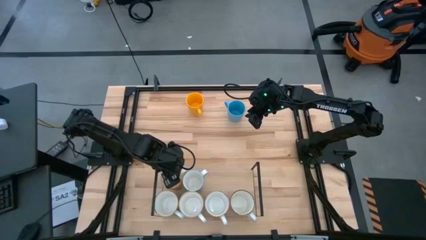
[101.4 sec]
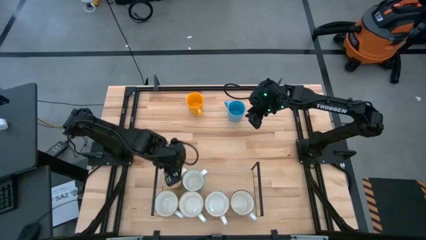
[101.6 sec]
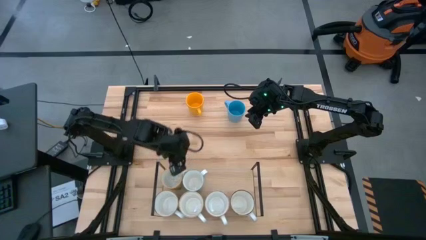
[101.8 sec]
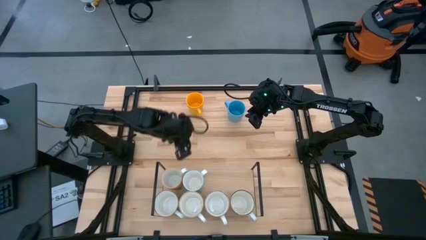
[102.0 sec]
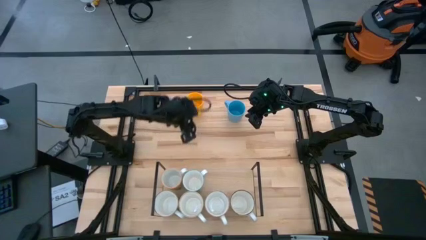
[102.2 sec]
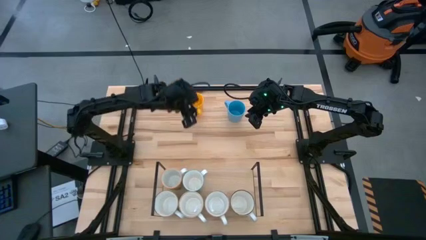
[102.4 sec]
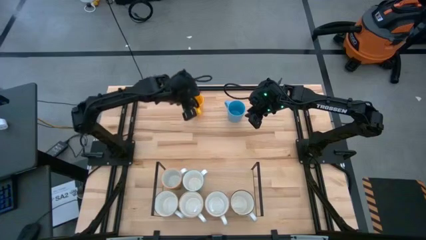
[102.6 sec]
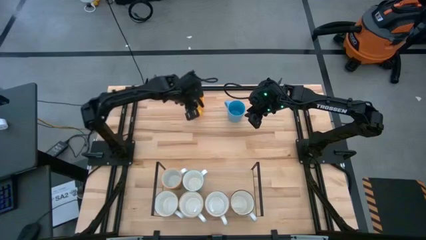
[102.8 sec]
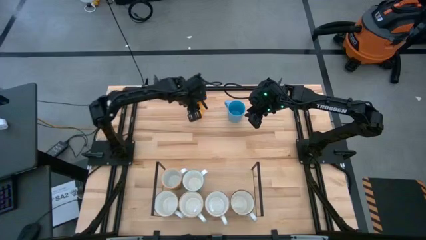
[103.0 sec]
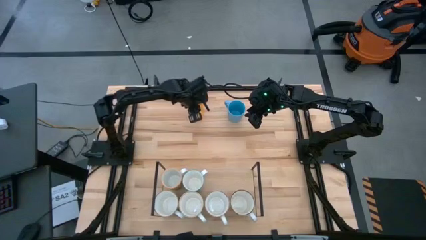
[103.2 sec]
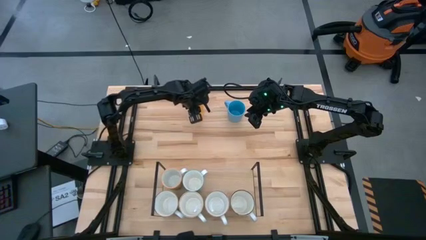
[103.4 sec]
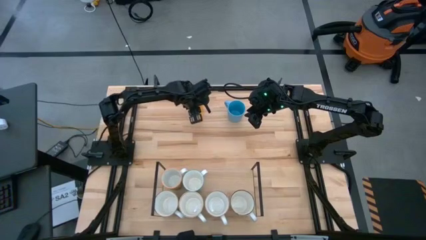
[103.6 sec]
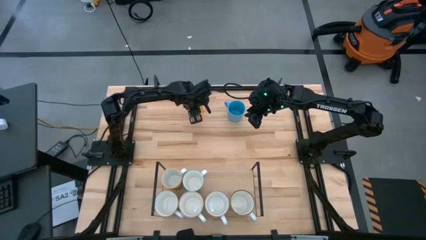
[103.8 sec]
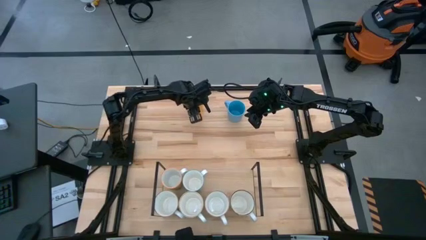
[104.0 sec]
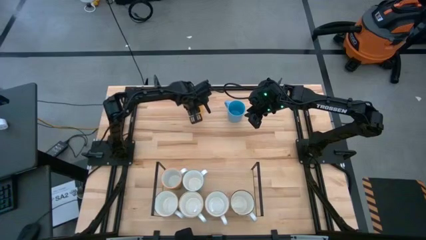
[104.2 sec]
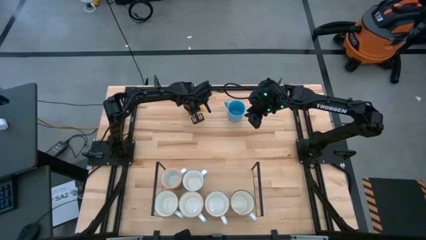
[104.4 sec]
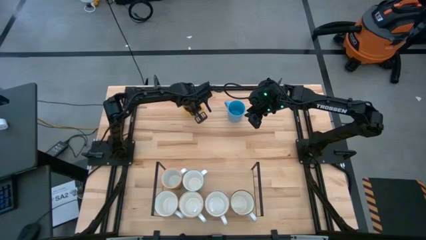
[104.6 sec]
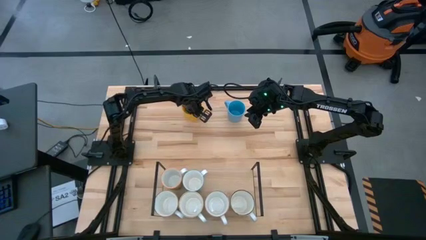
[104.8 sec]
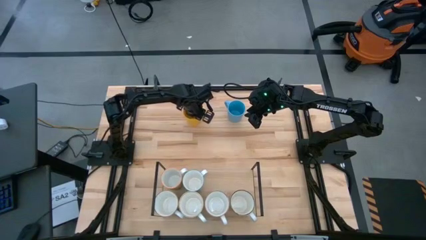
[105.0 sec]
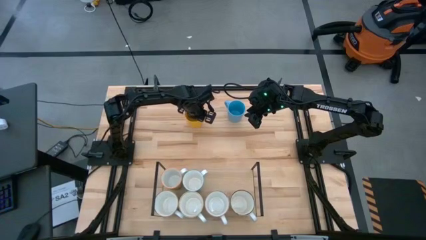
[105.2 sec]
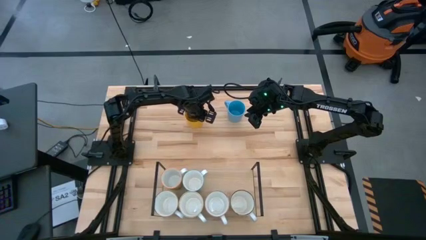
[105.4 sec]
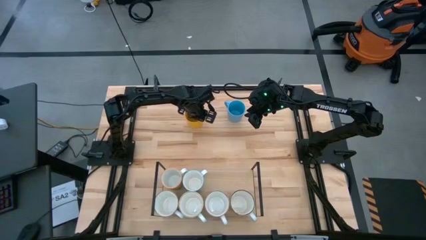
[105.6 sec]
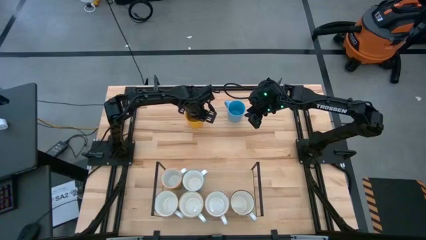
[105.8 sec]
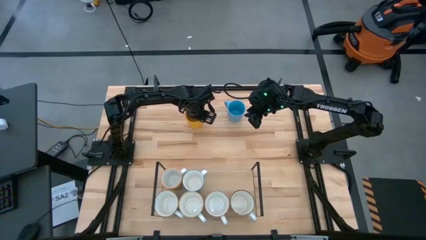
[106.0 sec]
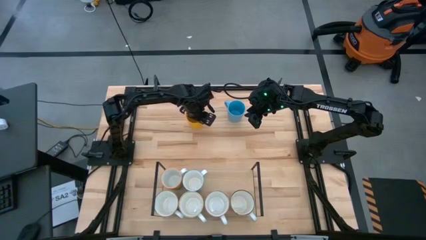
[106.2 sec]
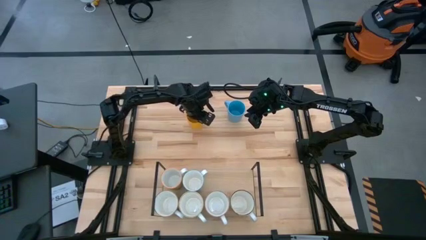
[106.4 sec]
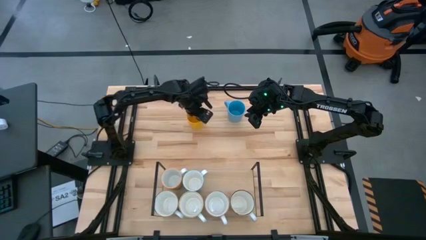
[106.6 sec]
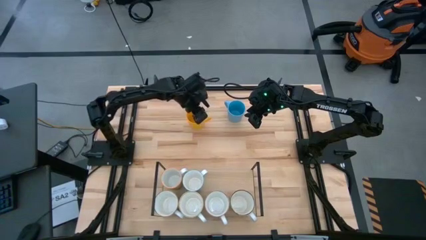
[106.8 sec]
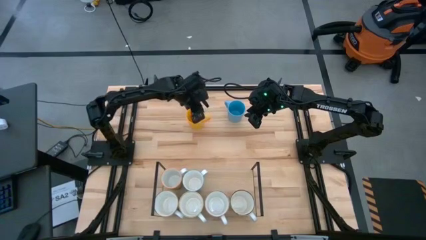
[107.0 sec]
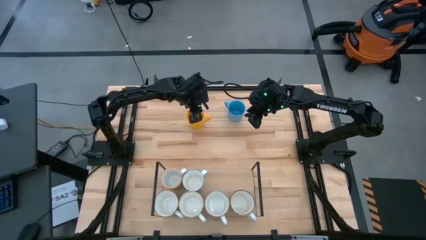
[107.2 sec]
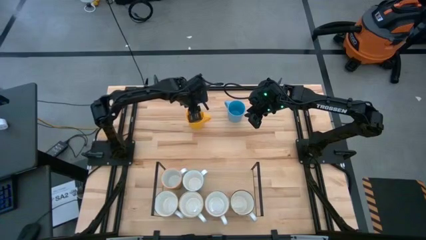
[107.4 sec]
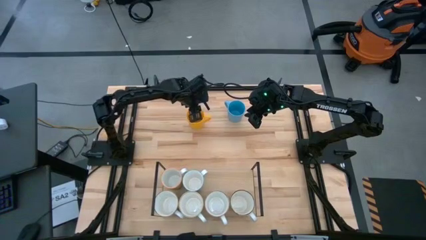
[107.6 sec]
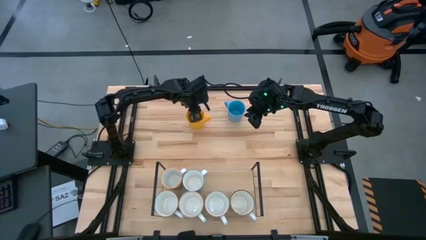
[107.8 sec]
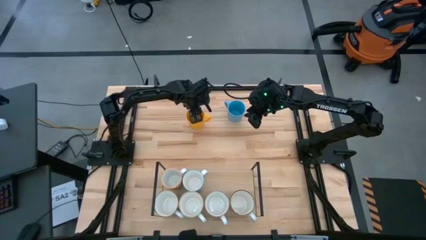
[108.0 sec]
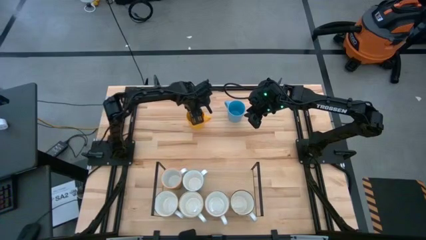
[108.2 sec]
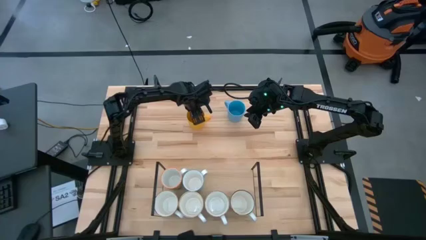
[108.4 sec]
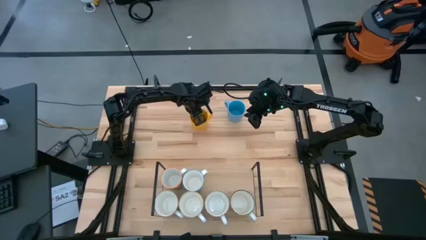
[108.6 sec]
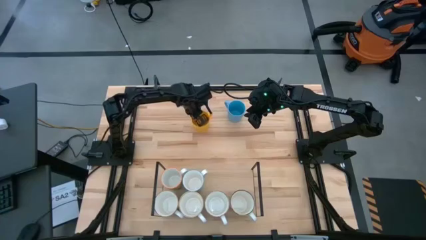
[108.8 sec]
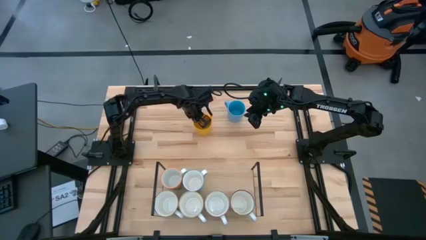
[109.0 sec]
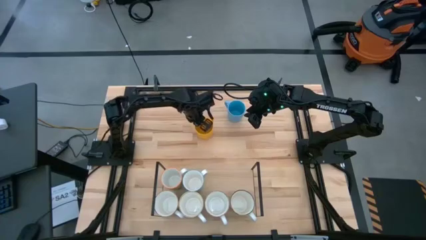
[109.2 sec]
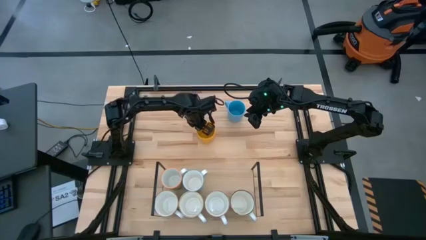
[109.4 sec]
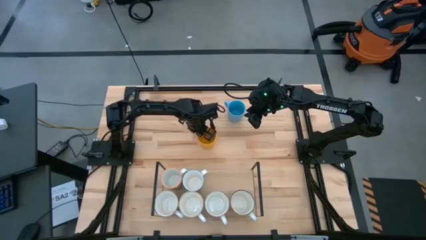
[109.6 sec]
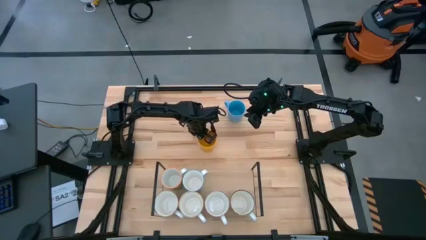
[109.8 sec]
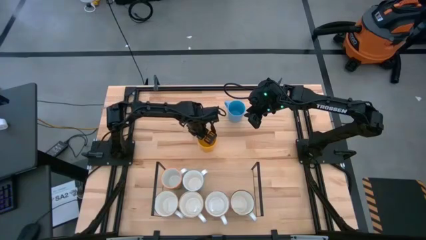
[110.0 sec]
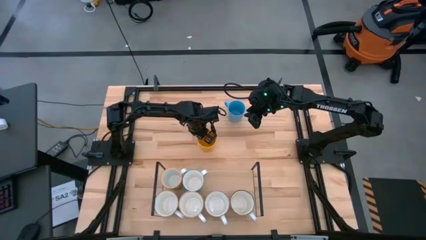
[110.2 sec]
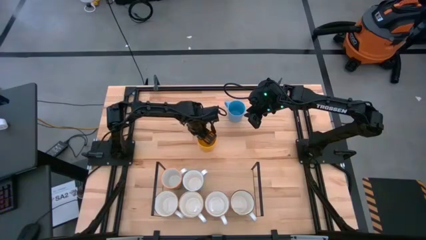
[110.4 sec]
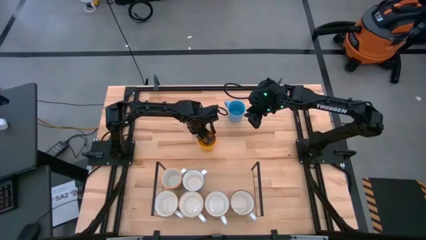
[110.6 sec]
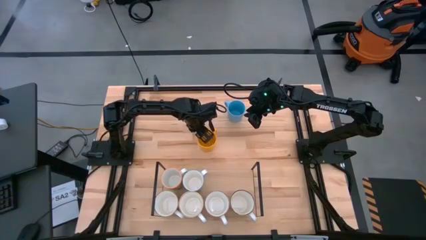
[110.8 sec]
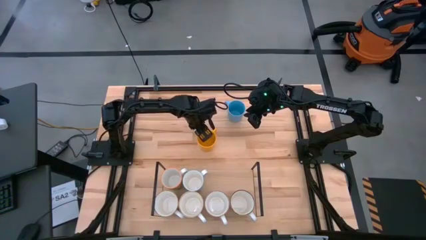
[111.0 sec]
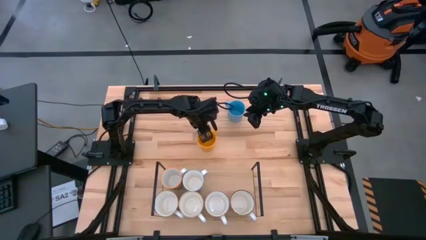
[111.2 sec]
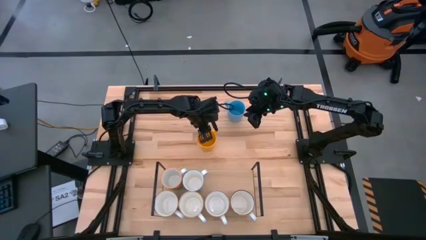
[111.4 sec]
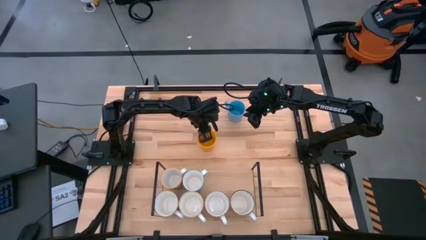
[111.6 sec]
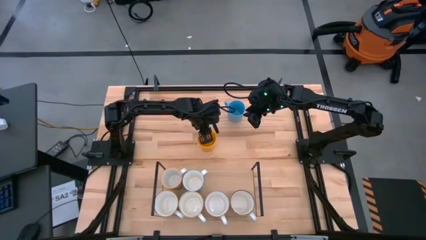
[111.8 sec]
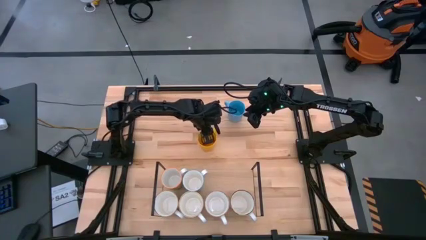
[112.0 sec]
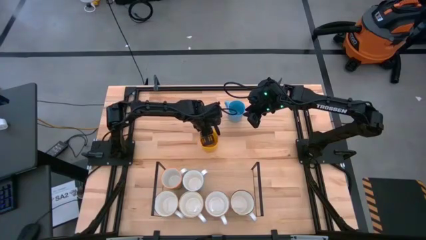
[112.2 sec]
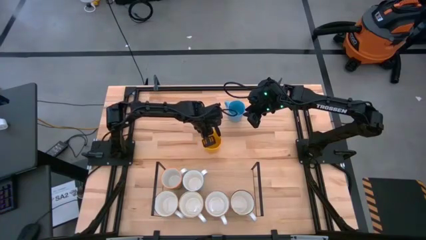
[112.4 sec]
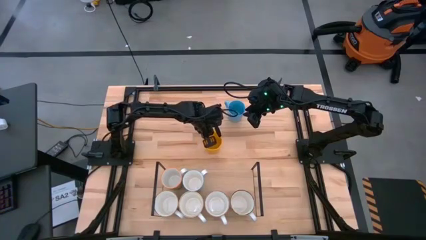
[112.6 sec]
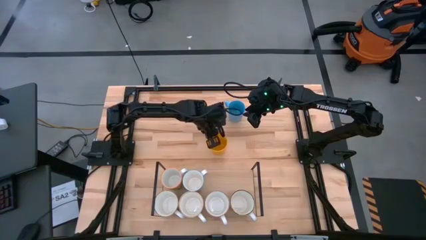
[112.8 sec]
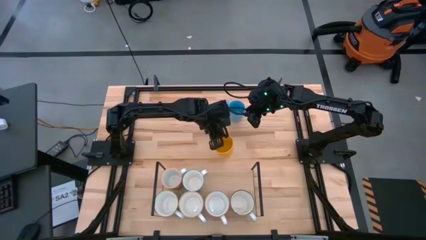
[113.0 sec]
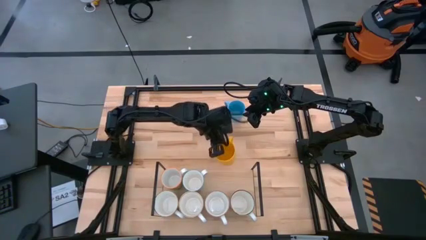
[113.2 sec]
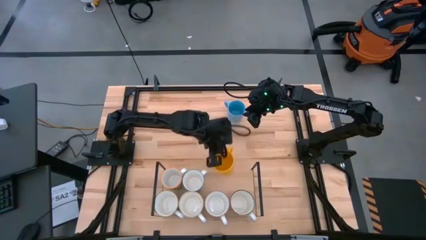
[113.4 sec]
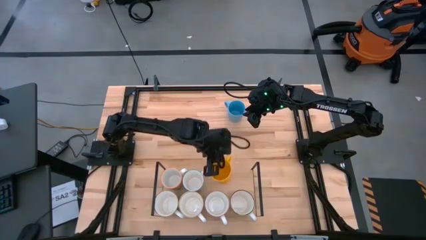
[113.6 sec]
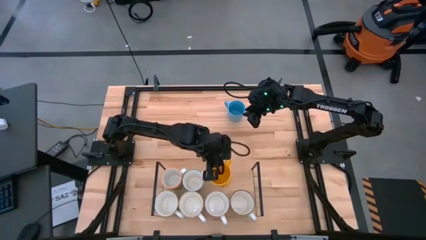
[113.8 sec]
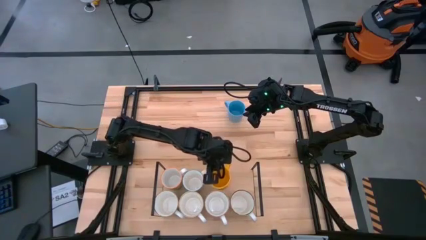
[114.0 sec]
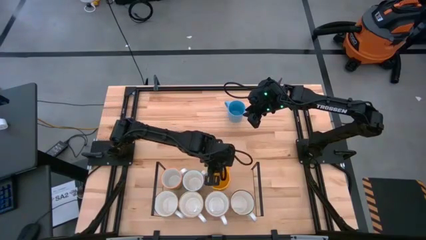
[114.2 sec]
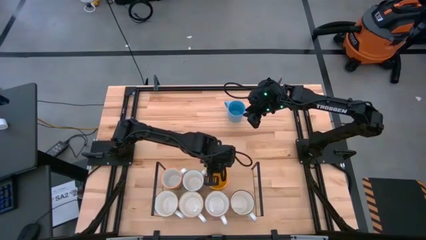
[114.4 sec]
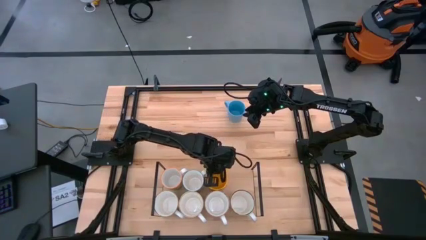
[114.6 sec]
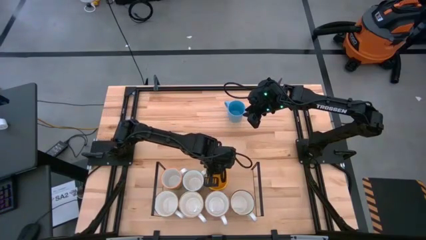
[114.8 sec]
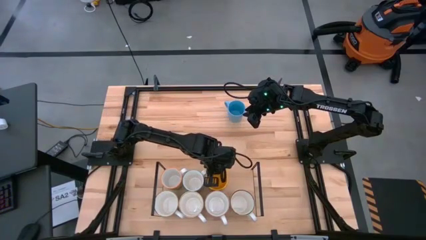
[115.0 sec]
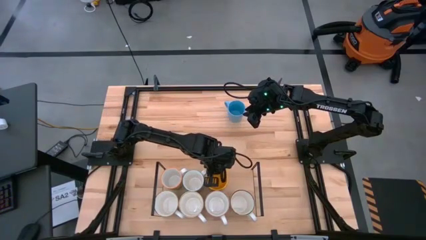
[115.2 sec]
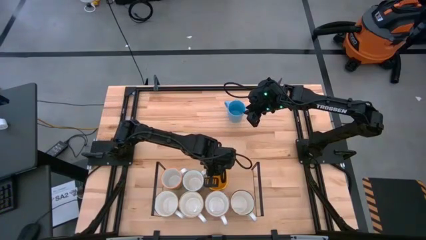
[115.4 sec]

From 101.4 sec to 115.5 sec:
Task: Place coffee mugs
Put the yellow mug on the shelf
